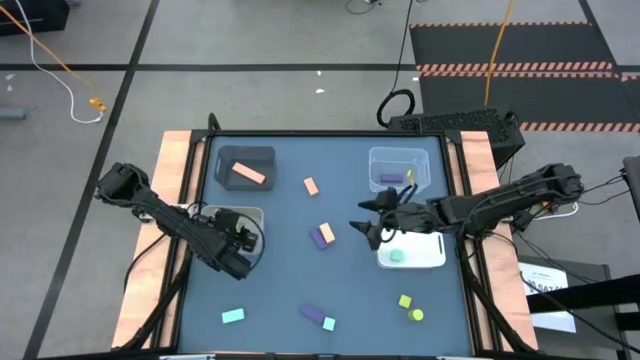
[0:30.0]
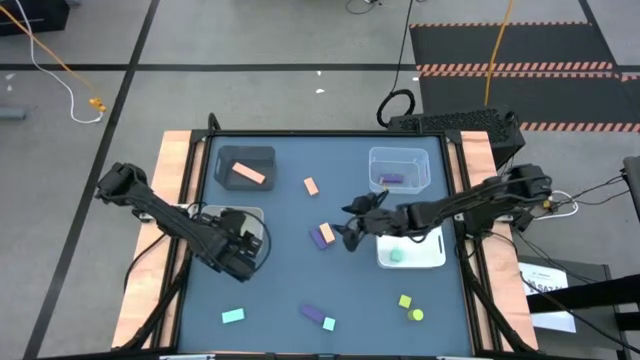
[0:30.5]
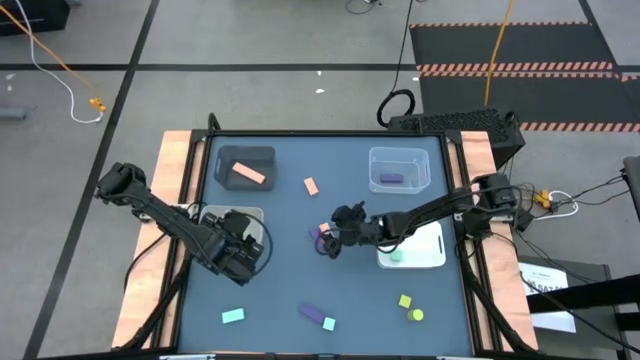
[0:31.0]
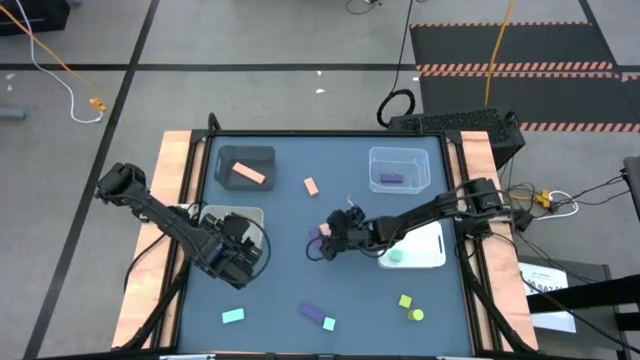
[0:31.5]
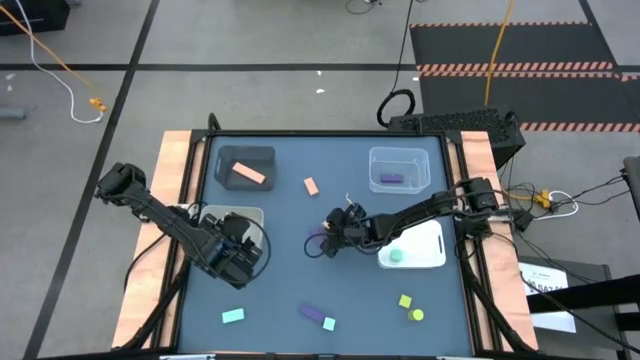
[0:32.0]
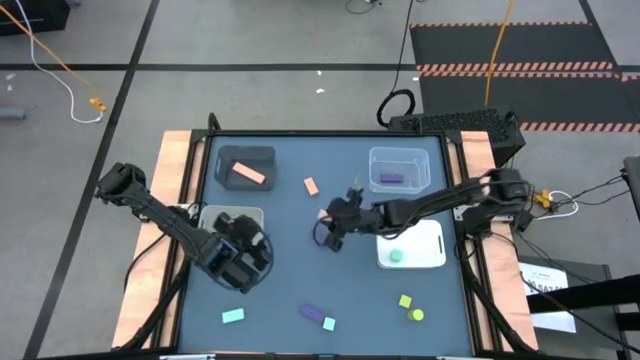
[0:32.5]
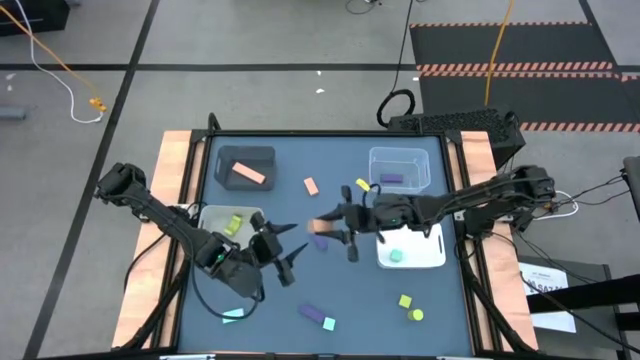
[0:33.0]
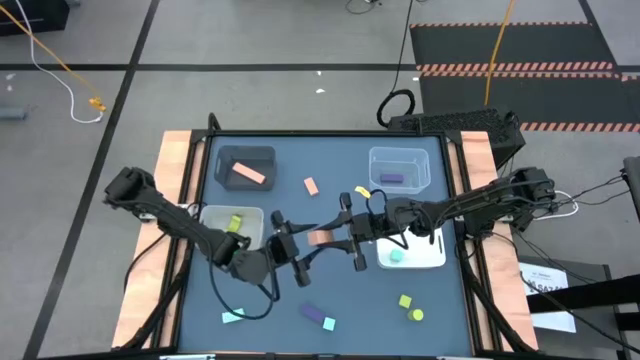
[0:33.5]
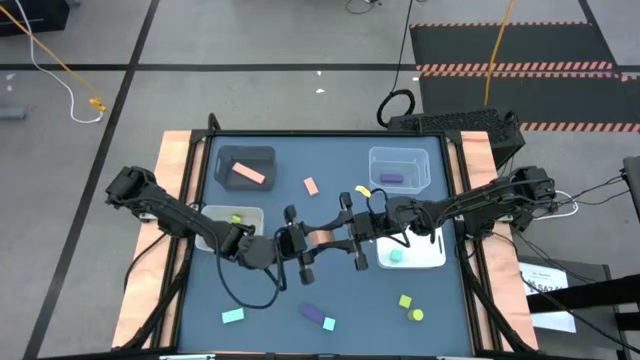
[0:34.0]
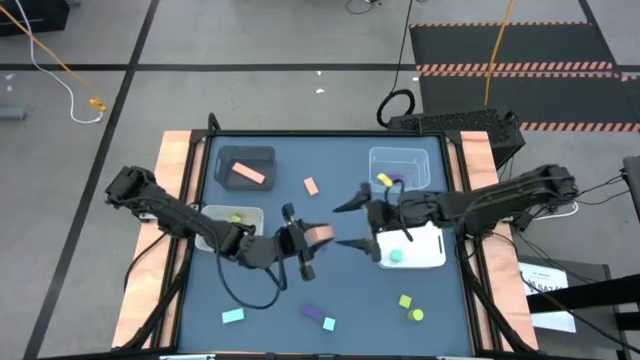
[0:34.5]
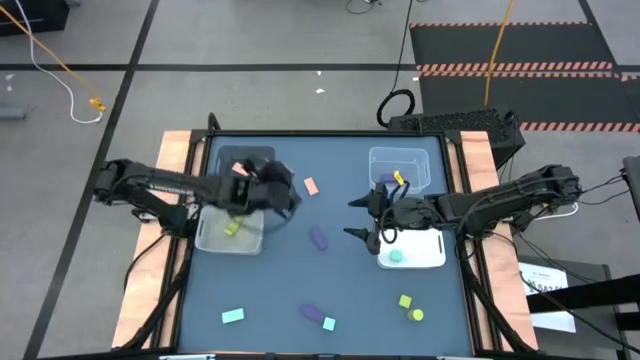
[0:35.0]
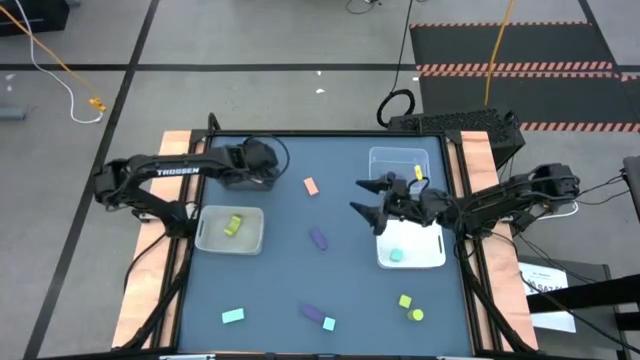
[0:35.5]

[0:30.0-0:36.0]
Task: Sort & place blocks by color
Put the bottom brown block into the black bin

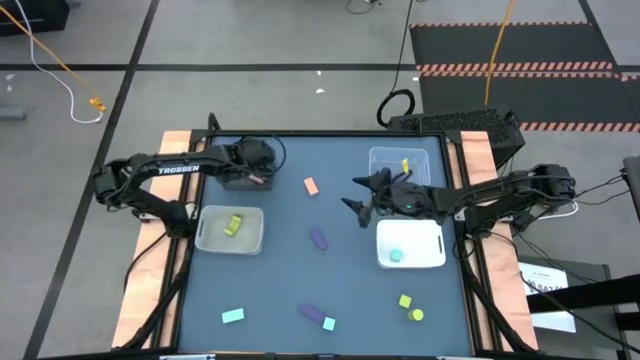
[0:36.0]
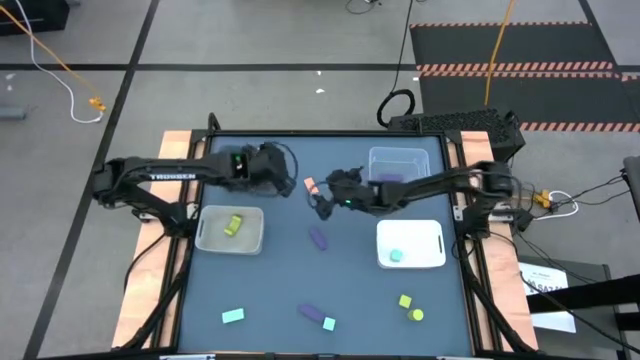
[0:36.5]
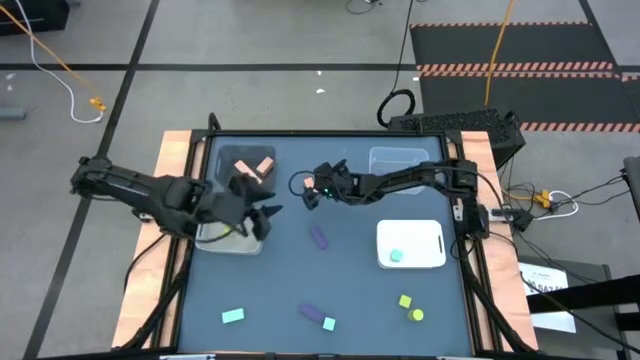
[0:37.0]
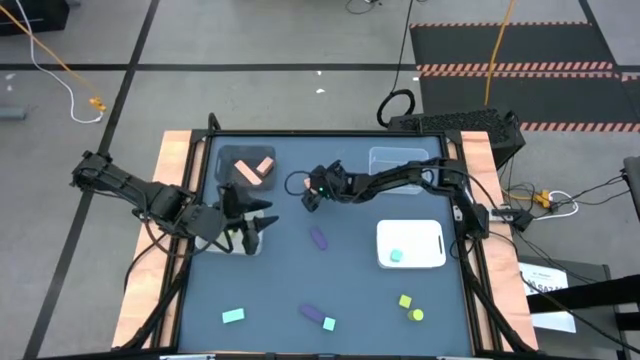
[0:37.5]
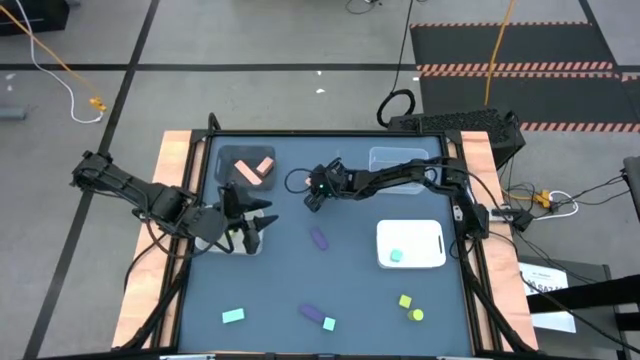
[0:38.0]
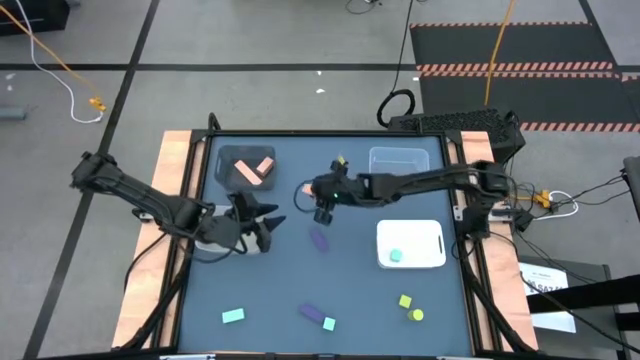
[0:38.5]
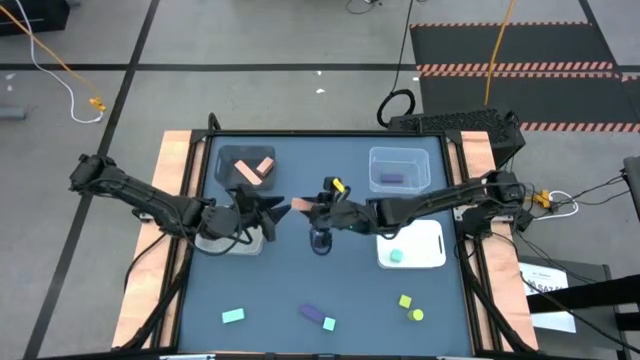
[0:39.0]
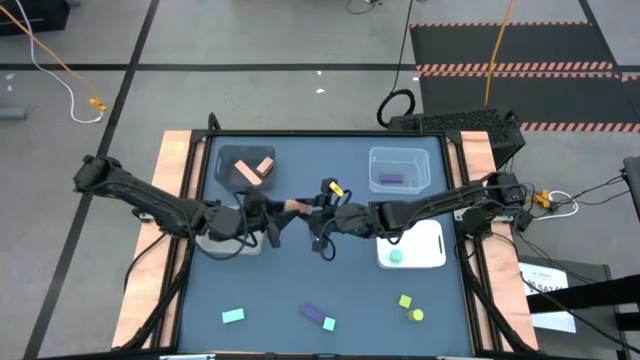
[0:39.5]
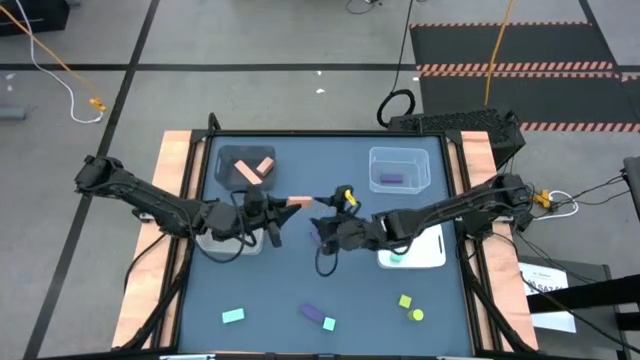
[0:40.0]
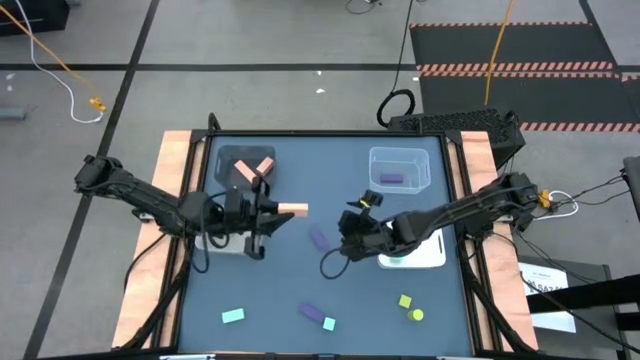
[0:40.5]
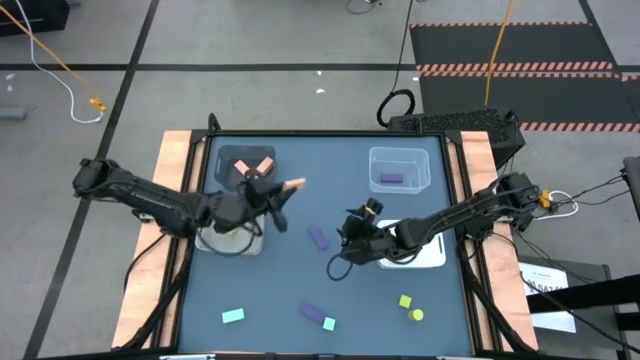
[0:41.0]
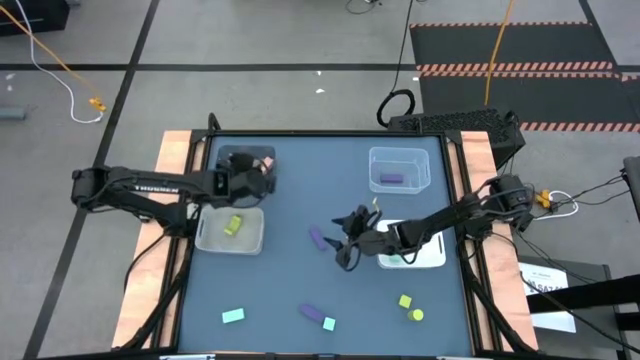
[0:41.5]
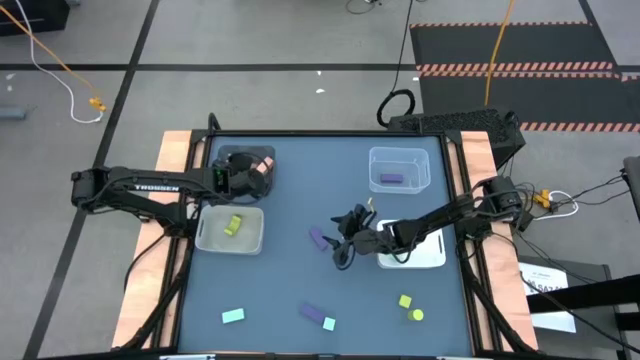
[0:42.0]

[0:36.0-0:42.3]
Put the brown block into the black bin

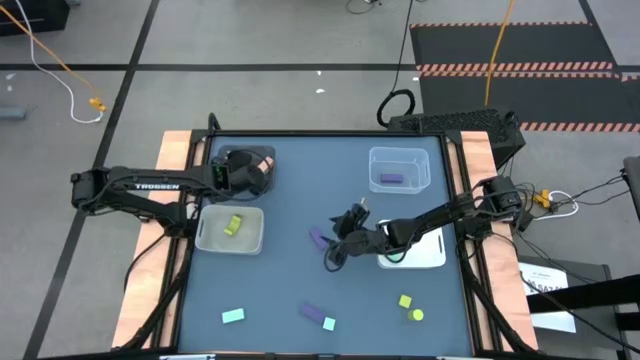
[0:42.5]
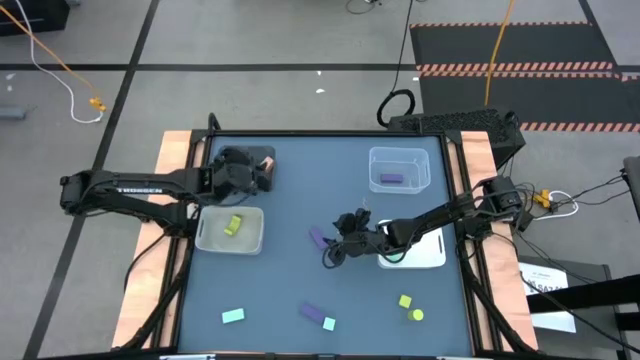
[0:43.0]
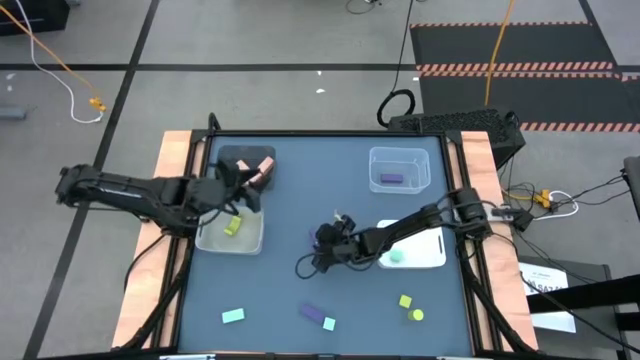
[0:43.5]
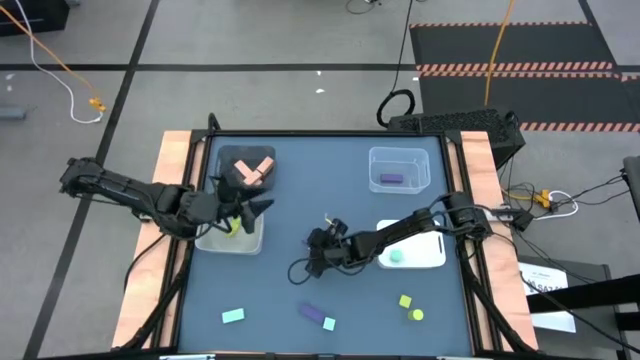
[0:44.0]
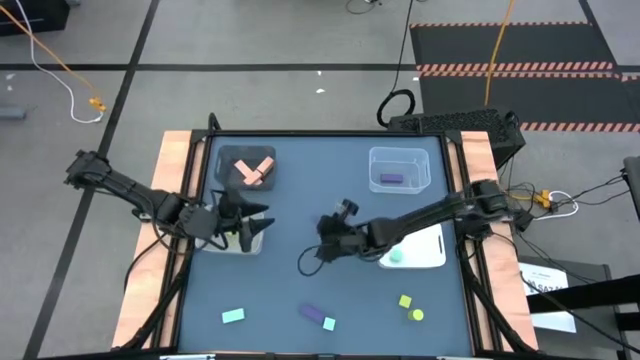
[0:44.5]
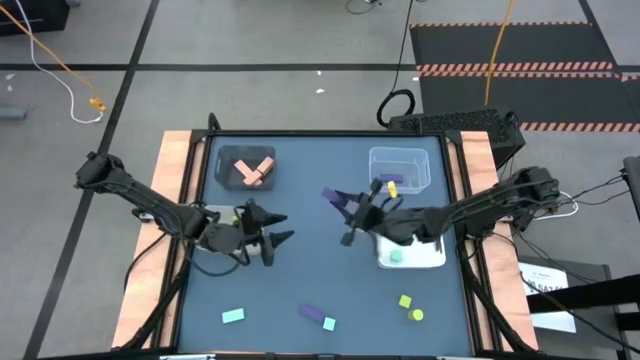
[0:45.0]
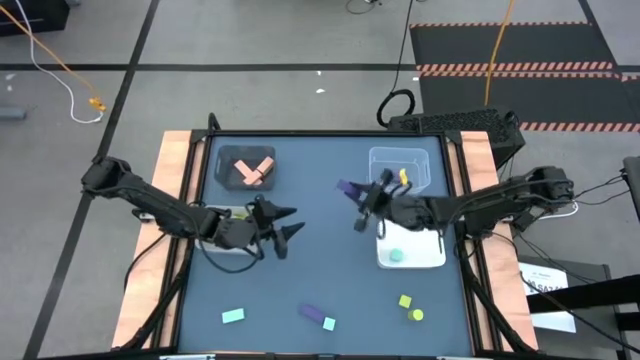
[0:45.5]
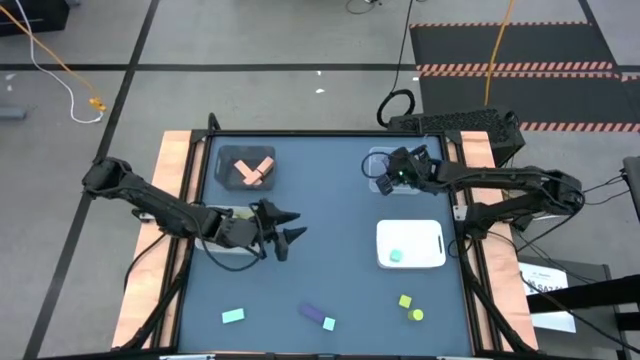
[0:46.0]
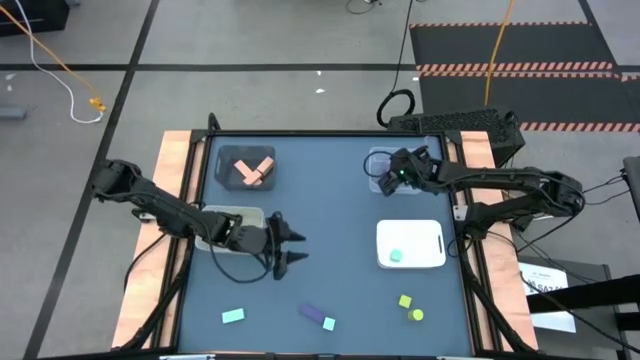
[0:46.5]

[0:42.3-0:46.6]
Put the top purple block into the transparent bin

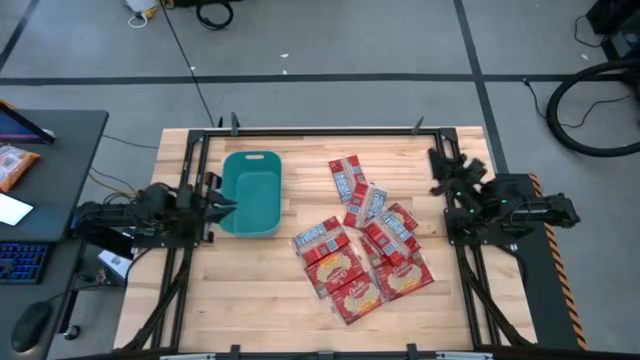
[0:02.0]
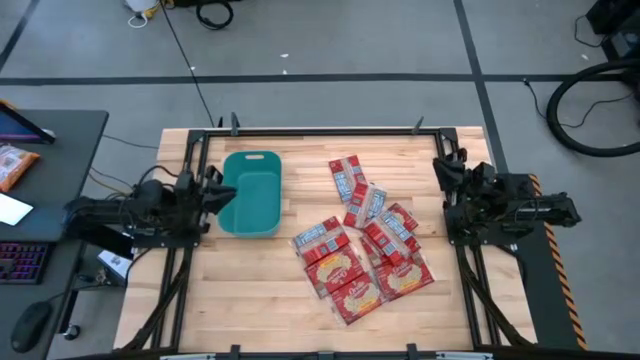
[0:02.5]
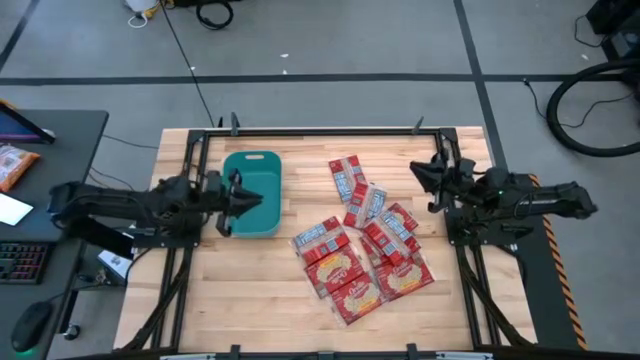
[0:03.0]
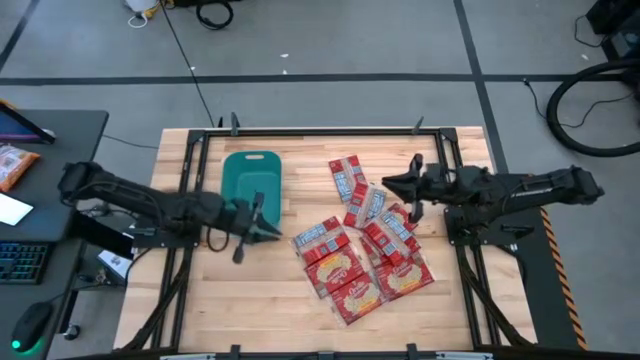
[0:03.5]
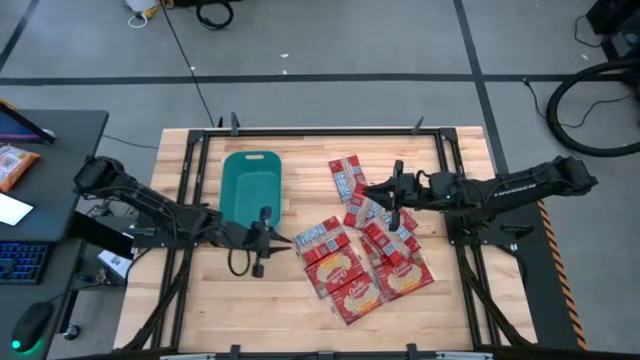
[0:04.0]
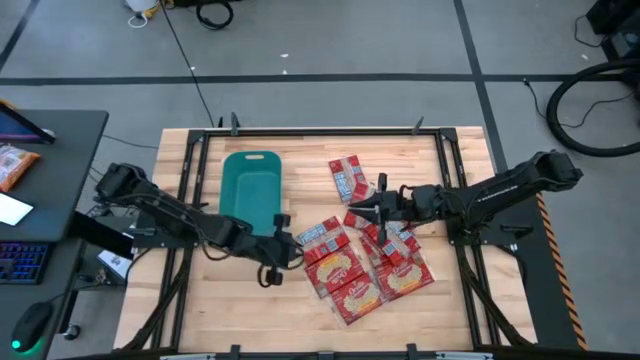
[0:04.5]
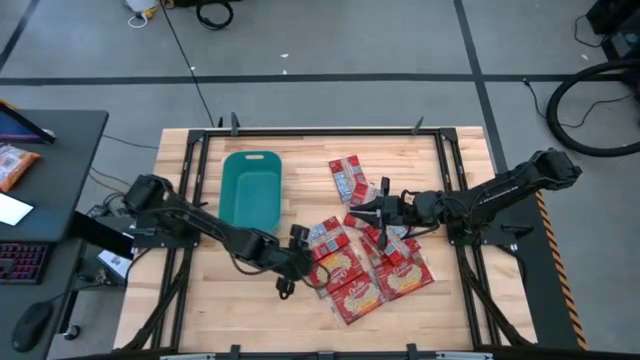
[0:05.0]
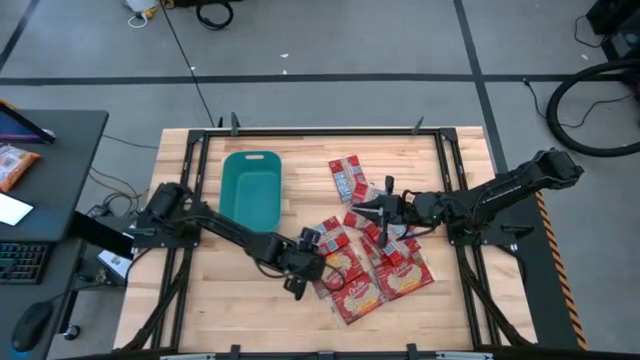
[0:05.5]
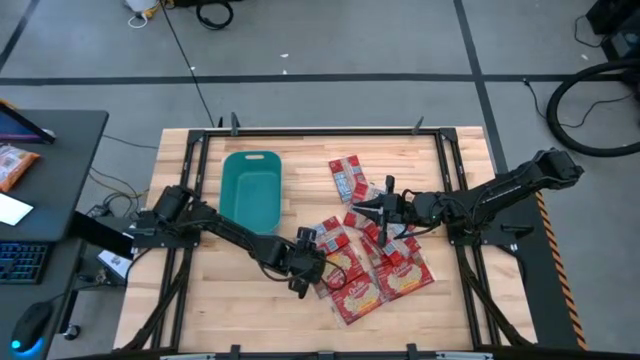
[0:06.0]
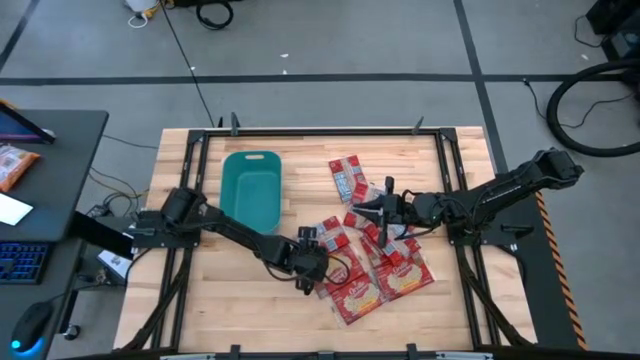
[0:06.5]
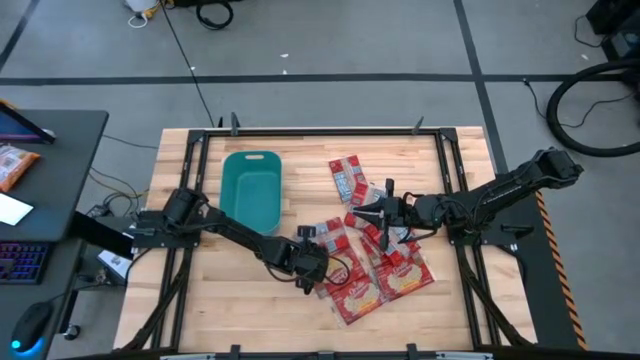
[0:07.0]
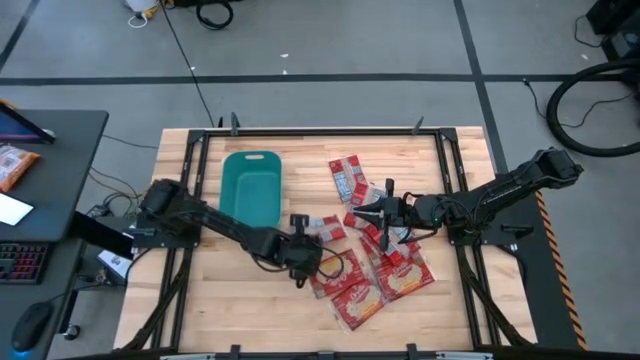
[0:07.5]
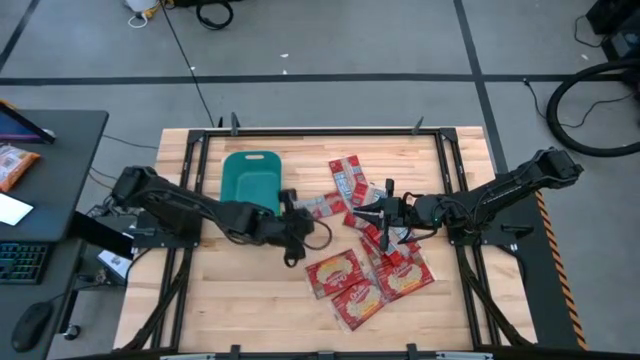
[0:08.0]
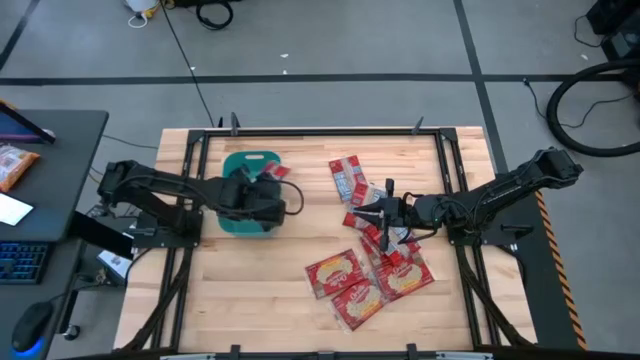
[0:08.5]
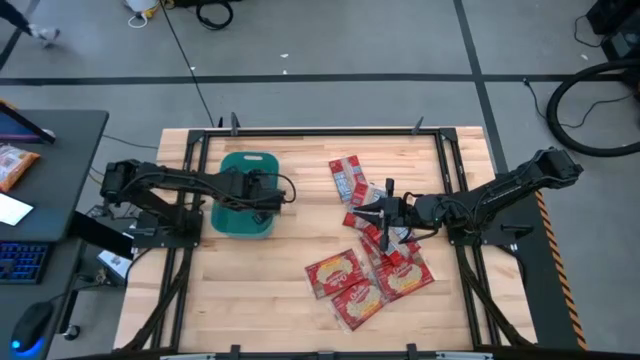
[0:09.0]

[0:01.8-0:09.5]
Task: Sort popcorn bags into baskets
Put the red popcorn bag into the green bin
